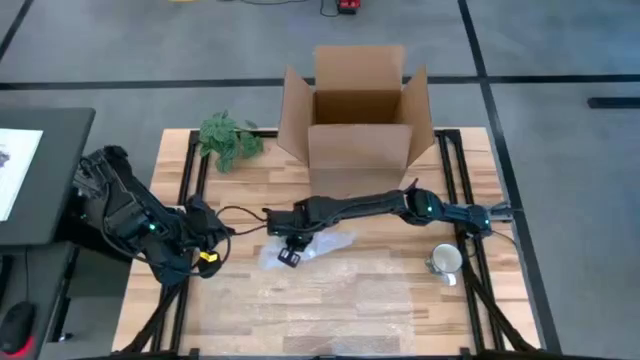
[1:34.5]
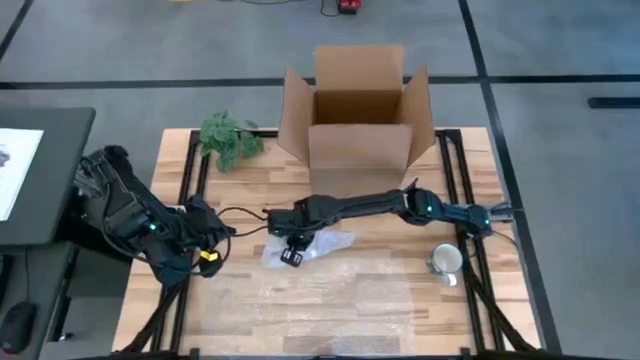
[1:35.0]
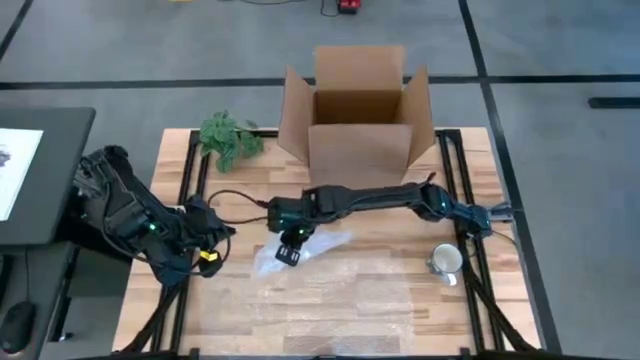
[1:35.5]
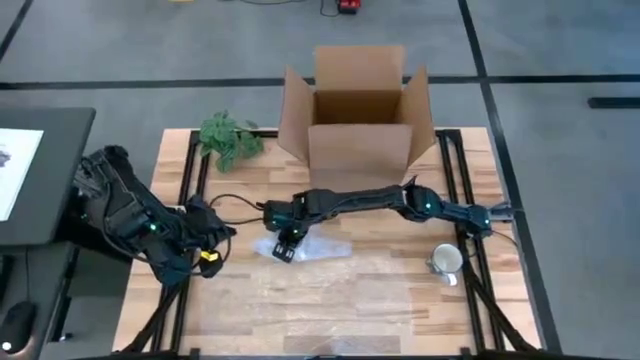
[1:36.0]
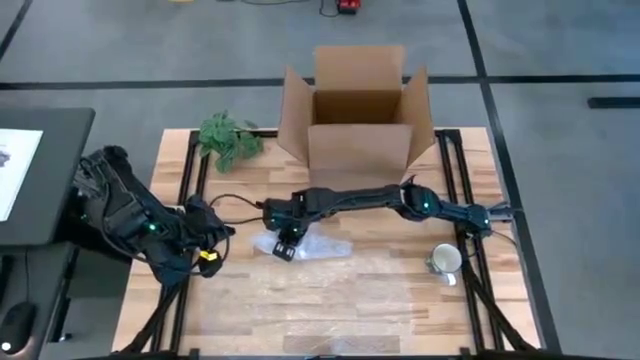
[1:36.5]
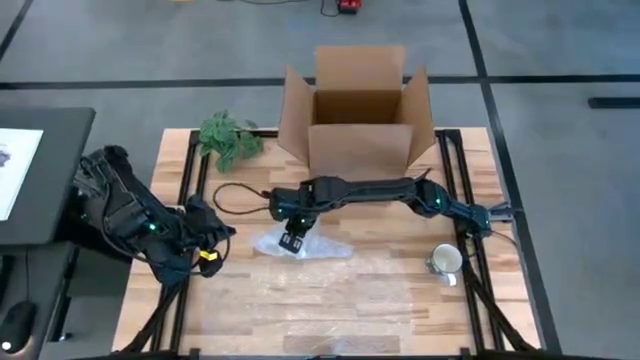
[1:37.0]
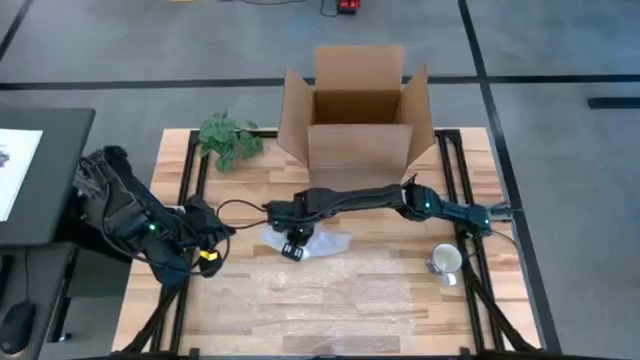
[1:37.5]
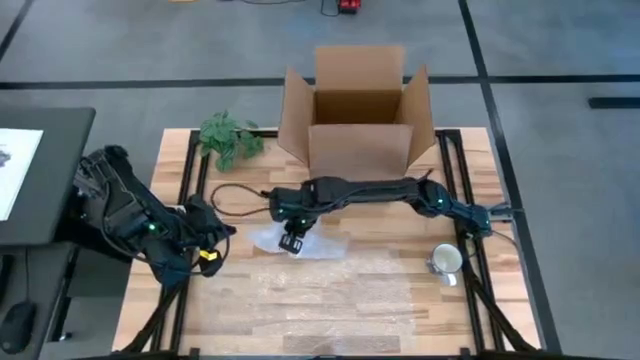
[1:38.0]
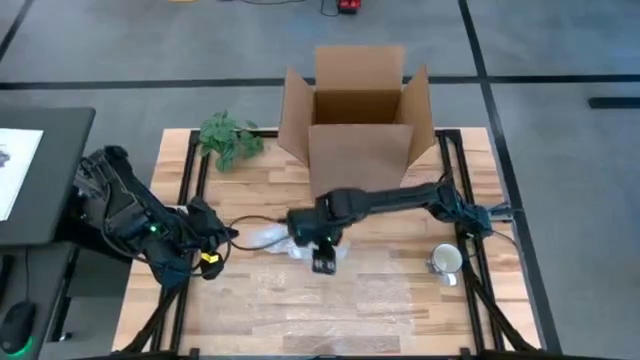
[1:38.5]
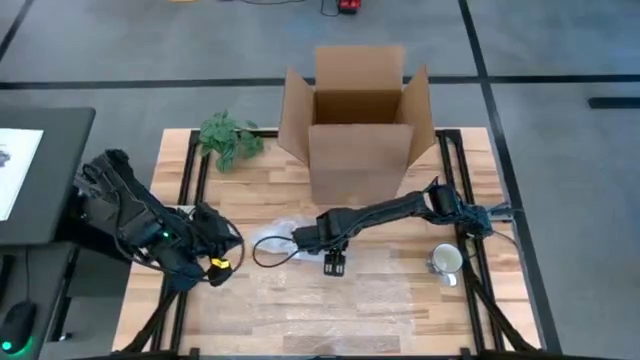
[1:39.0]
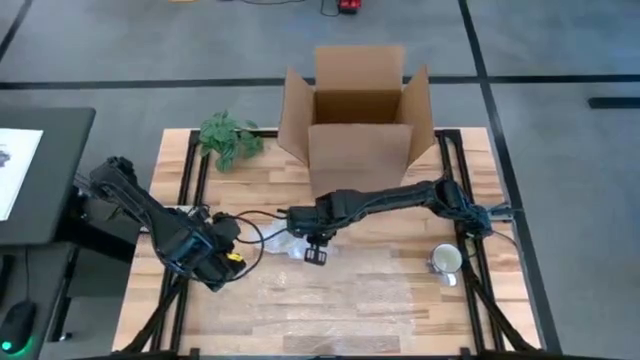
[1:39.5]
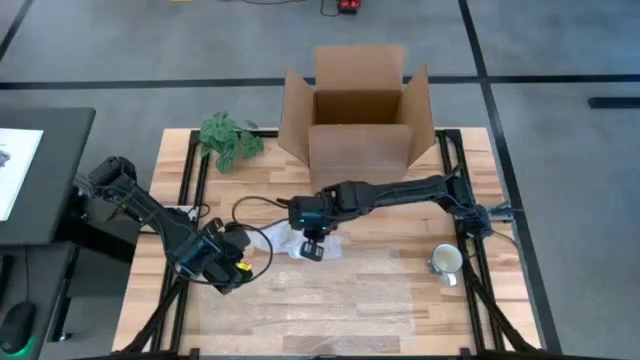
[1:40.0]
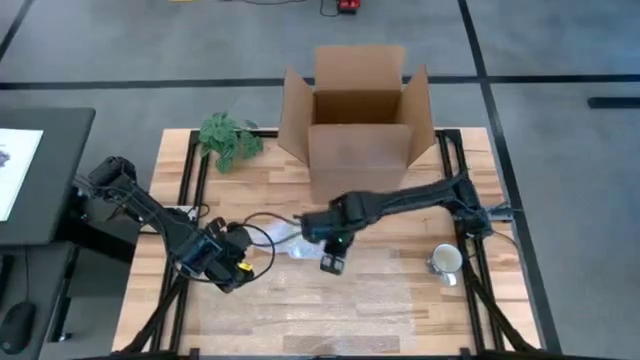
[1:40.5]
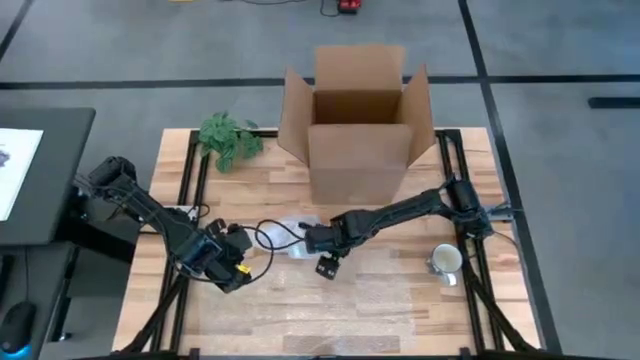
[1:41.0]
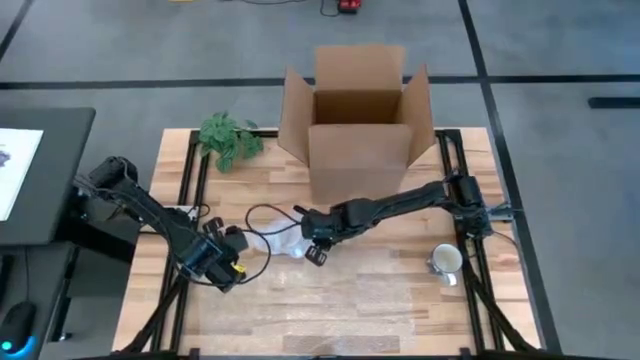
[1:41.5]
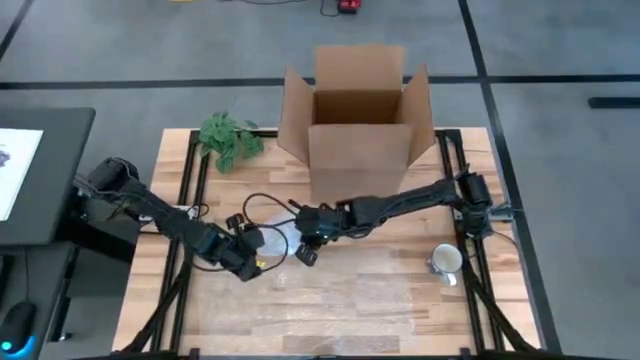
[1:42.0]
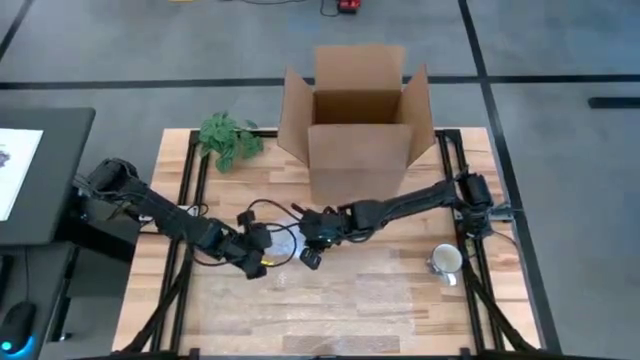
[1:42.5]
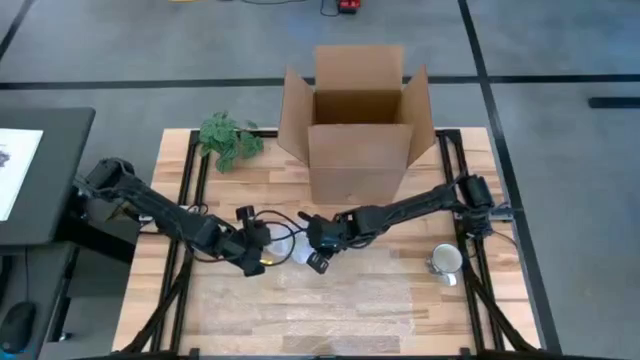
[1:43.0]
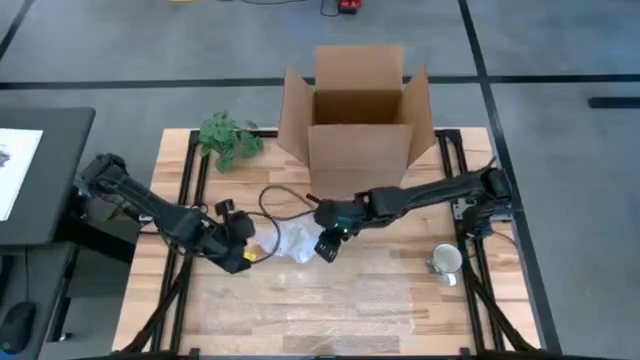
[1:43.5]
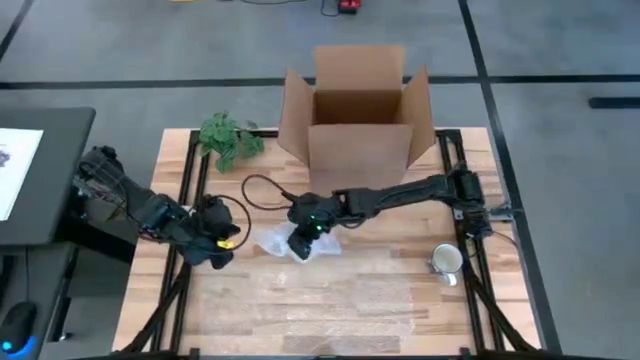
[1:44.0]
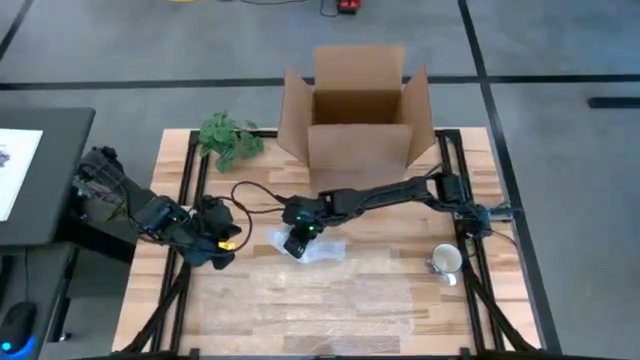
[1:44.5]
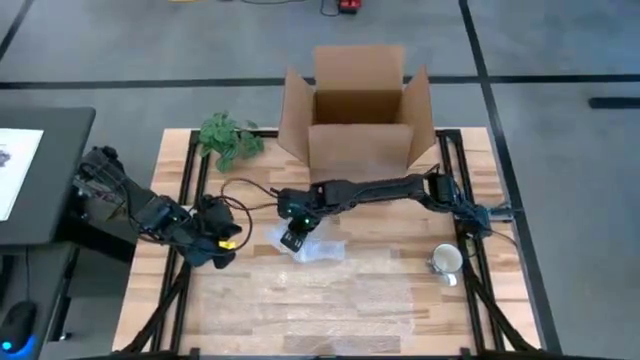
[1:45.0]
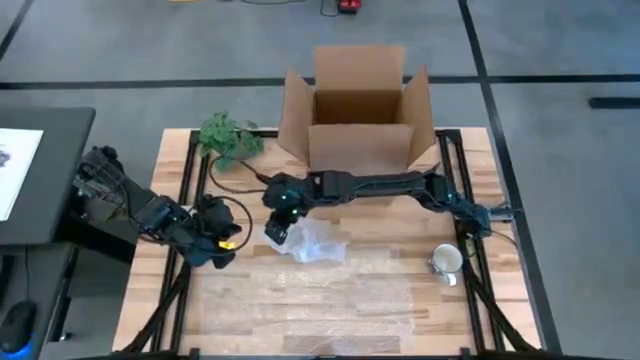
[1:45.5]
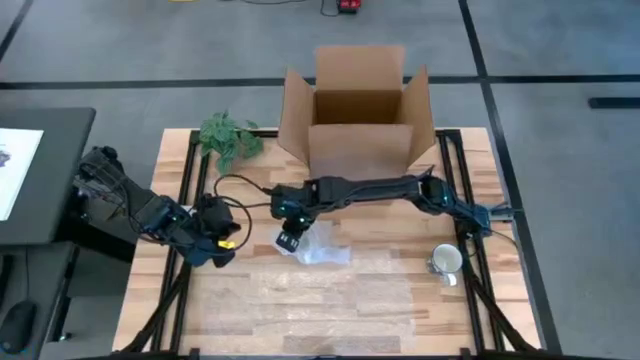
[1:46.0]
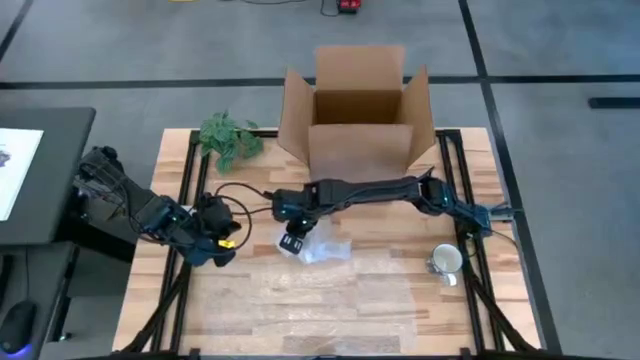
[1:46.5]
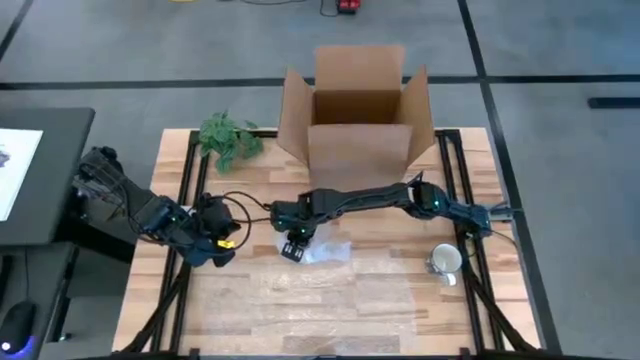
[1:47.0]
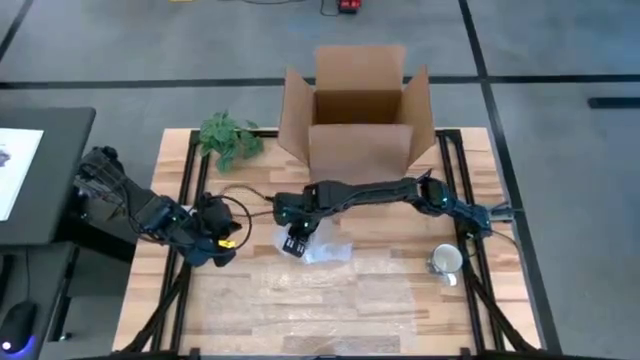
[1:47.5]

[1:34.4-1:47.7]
Task: wrap mug
Wrap the white mug with bubble wrap

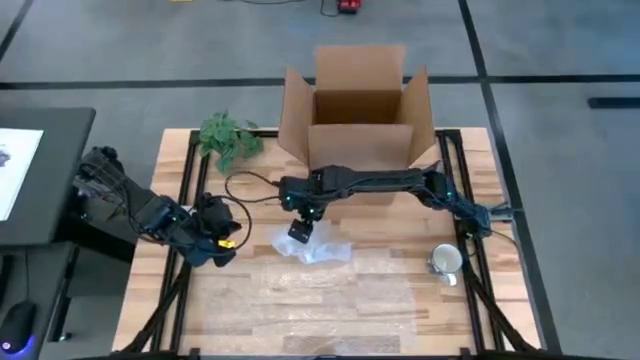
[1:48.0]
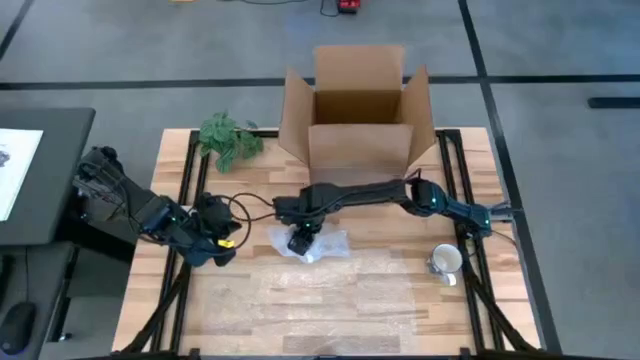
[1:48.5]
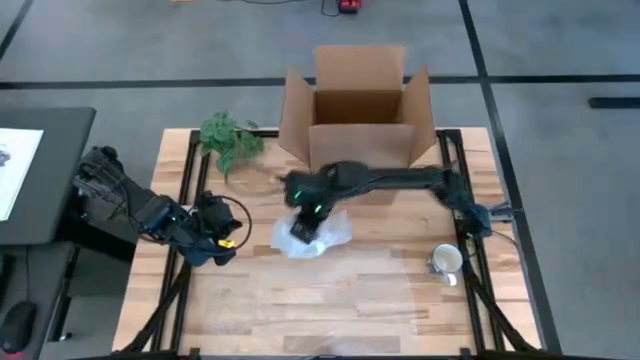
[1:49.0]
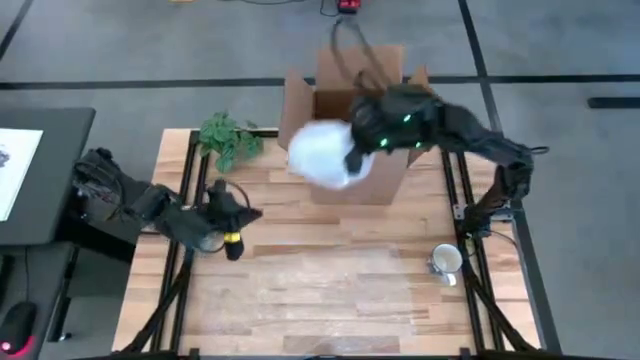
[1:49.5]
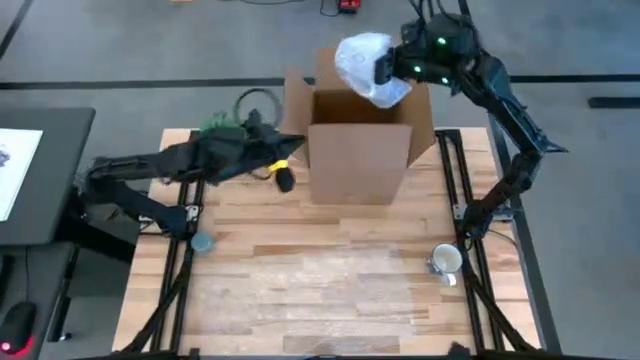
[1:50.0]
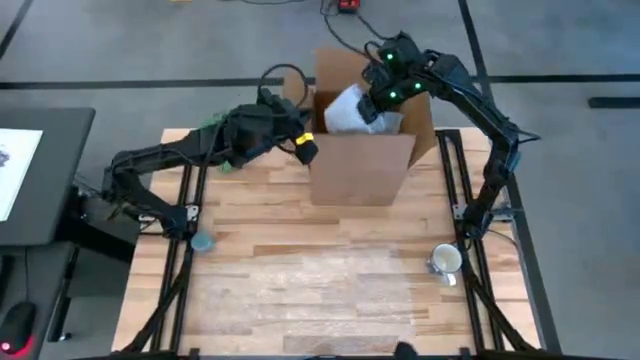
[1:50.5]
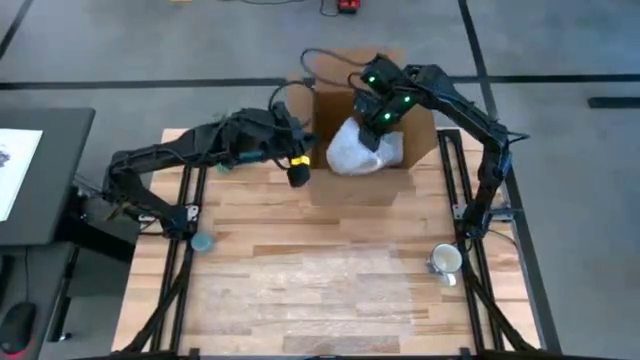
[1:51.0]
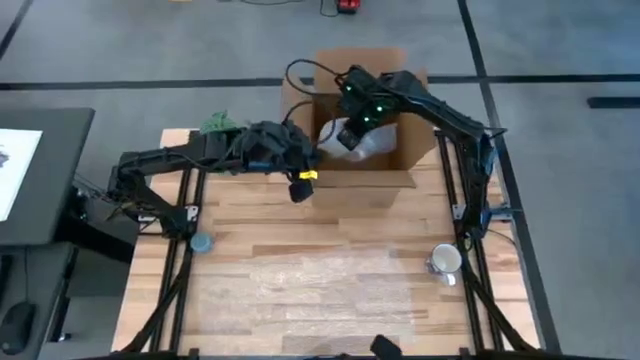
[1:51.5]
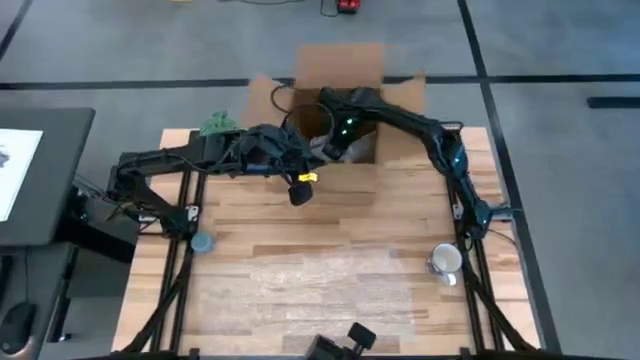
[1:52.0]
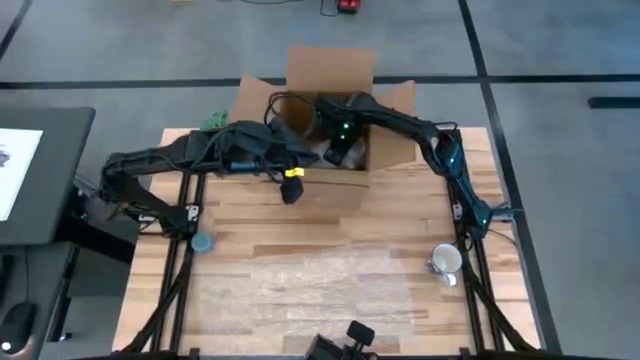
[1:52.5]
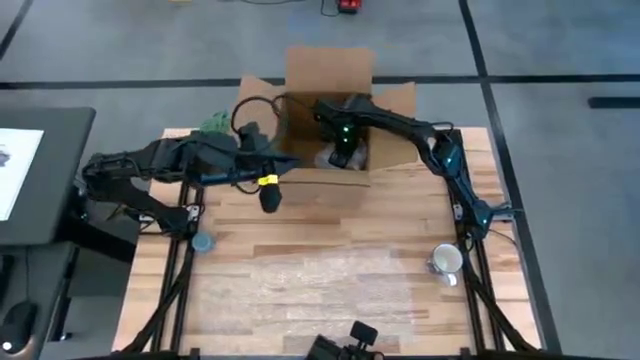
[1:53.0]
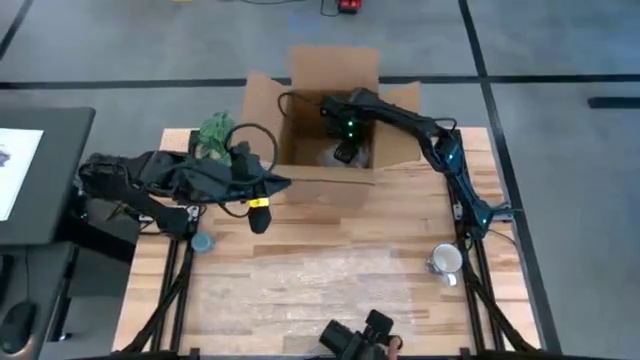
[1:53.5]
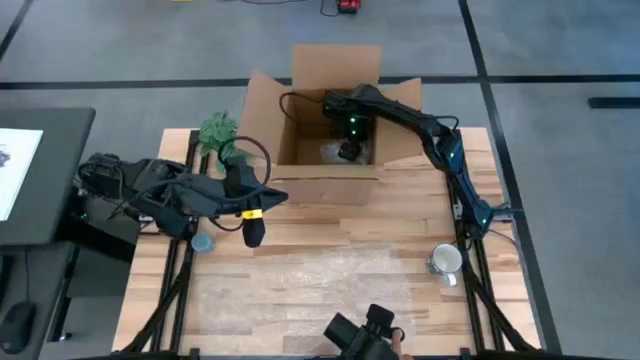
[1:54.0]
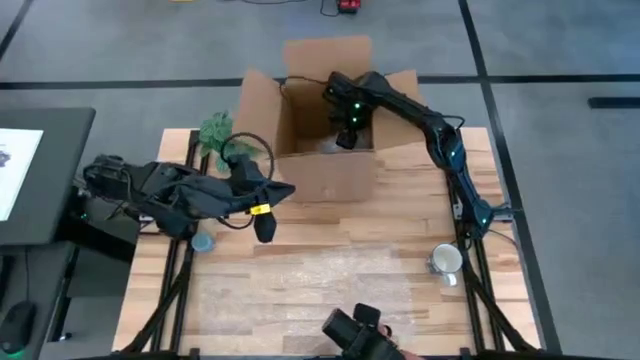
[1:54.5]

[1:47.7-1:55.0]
Put the wrapped white mug into the box
